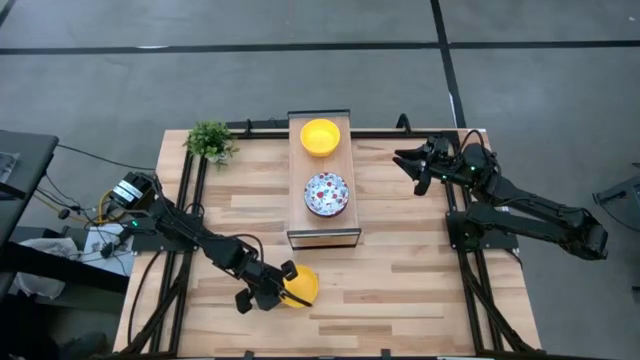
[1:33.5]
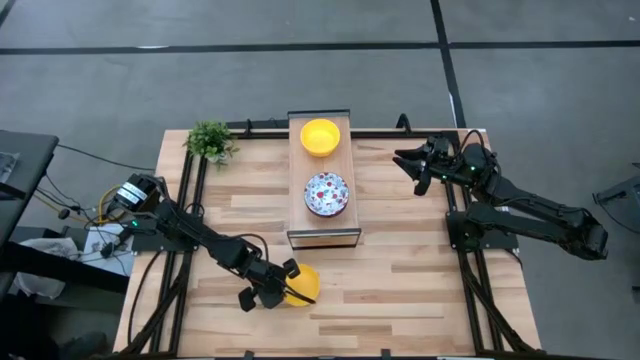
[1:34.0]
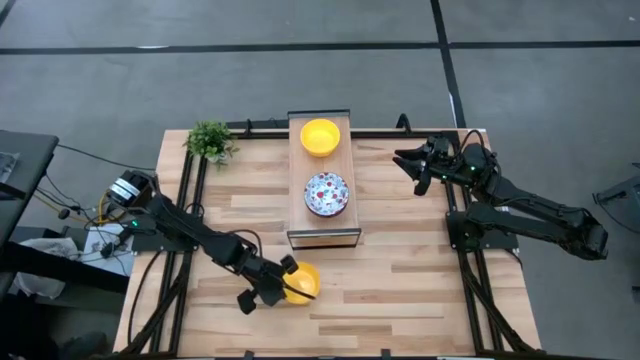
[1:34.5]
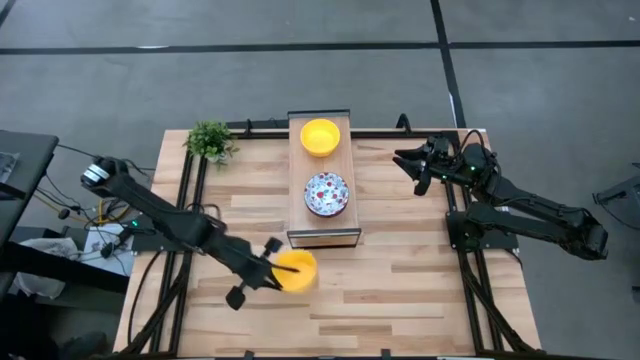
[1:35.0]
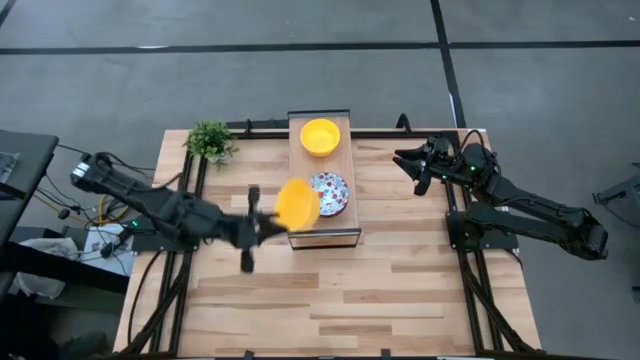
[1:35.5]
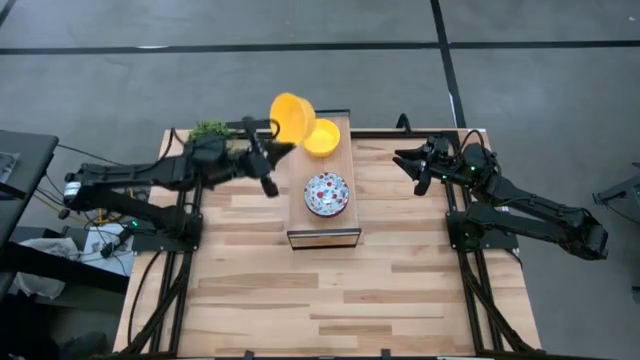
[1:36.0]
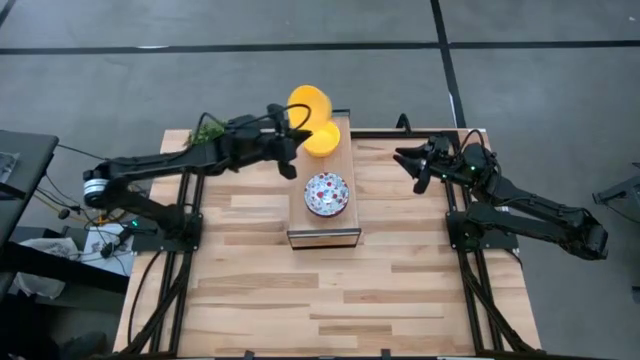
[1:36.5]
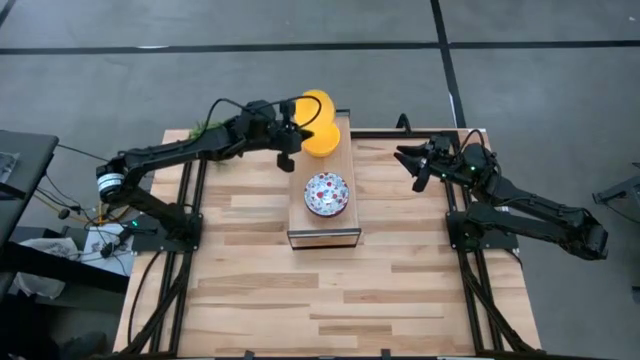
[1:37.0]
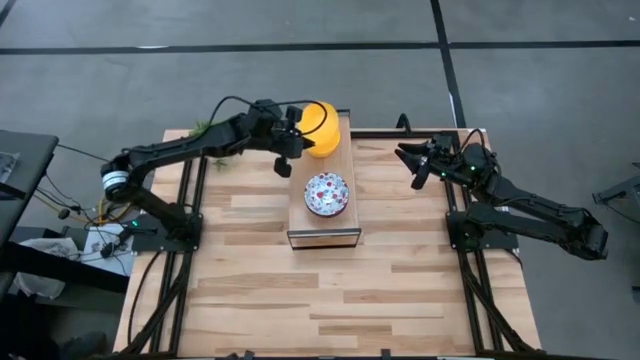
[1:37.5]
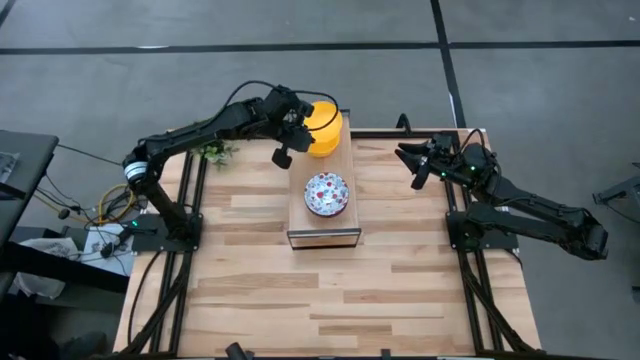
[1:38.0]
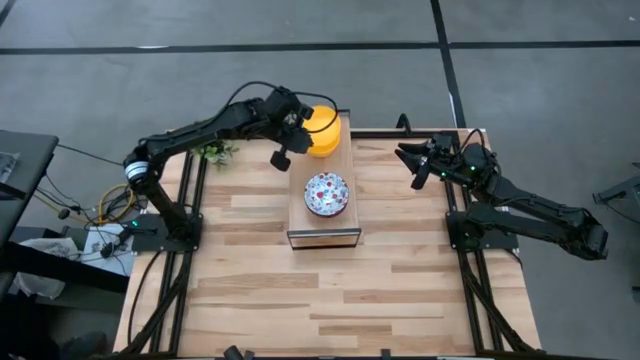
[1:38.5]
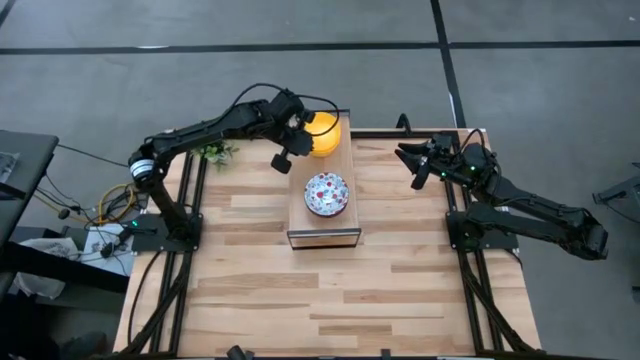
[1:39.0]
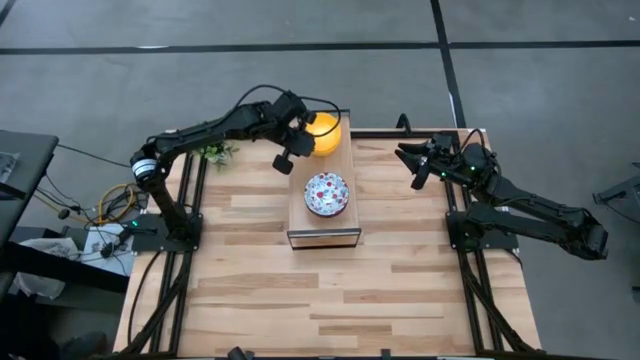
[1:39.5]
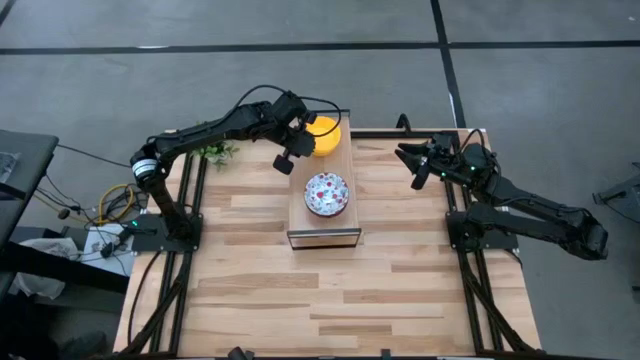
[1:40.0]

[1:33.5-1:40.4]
Task: Pick & Place Mini bowls
Stack the yellow bowl on top of the yellow bowl on the shelf

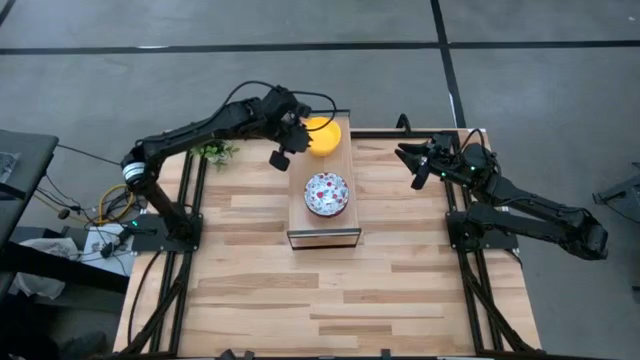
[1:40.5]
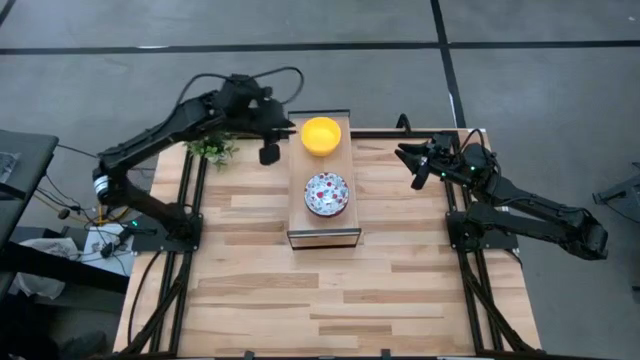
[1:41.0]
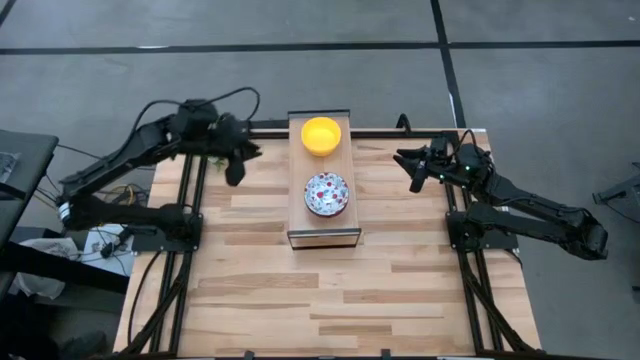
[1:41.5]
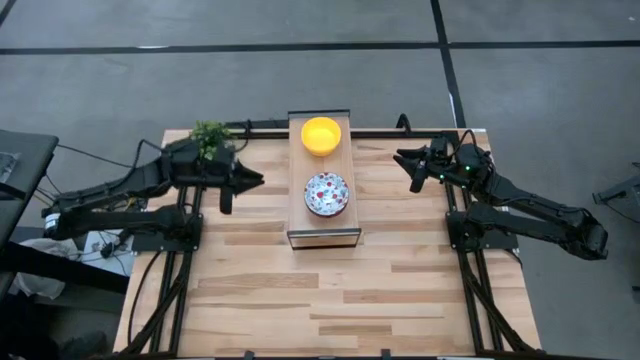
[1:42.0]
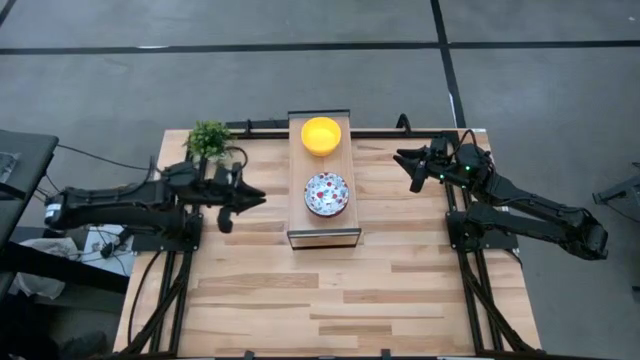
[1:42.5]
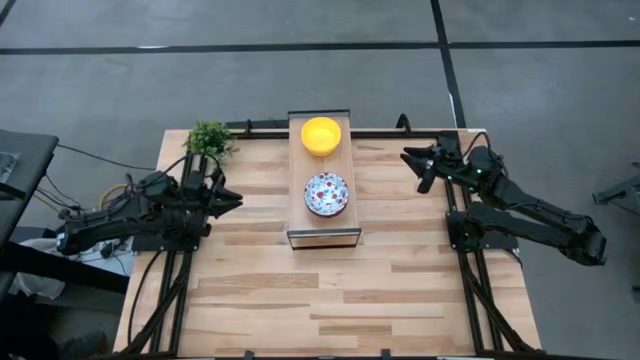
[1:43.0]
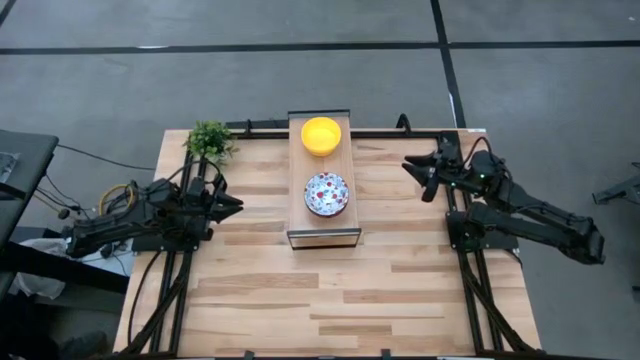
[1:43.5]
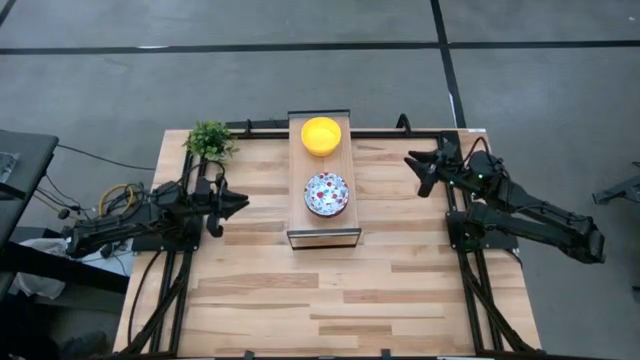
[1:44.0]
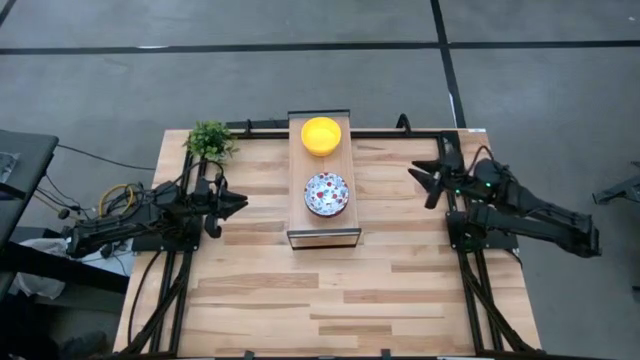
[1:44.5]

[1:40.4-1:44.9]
Return to Home Position

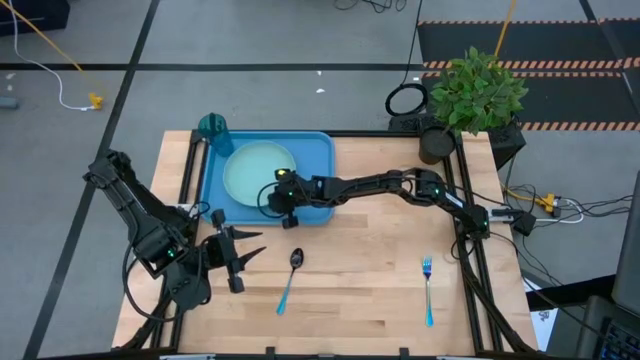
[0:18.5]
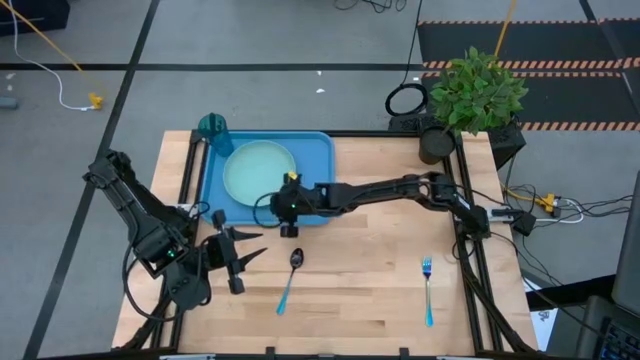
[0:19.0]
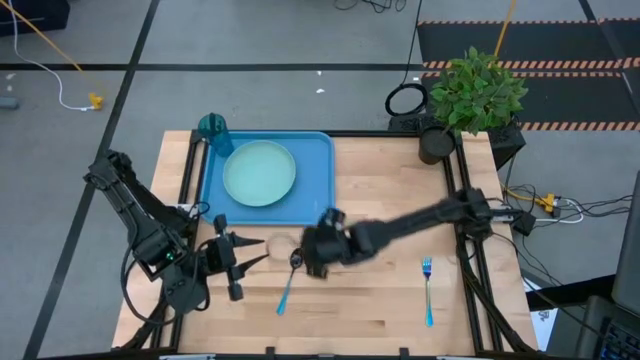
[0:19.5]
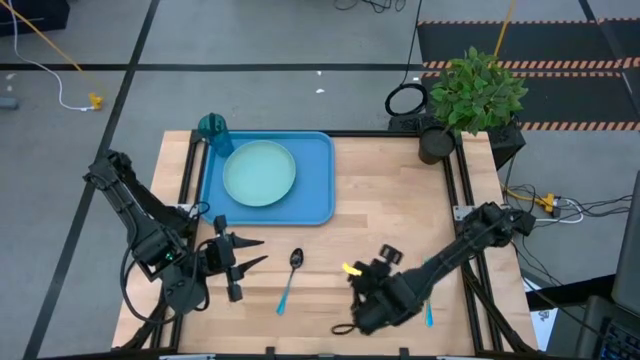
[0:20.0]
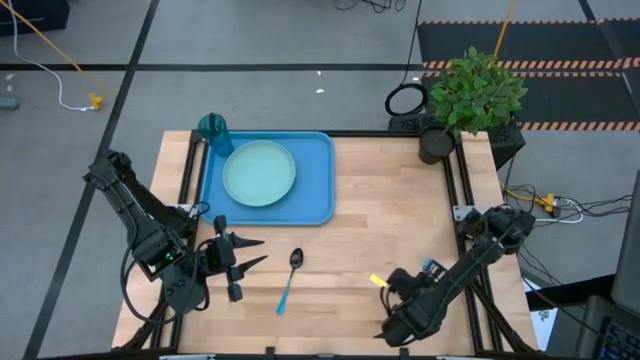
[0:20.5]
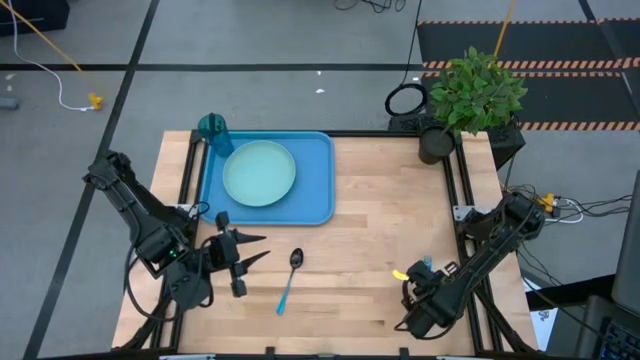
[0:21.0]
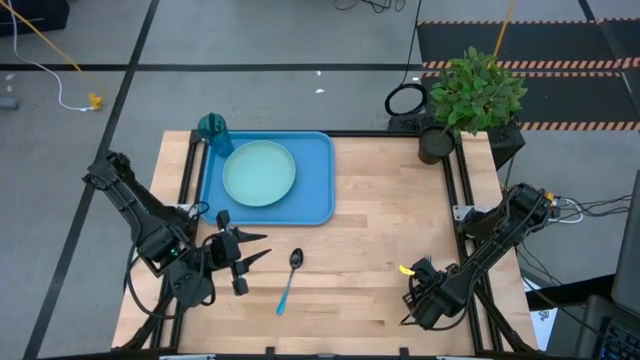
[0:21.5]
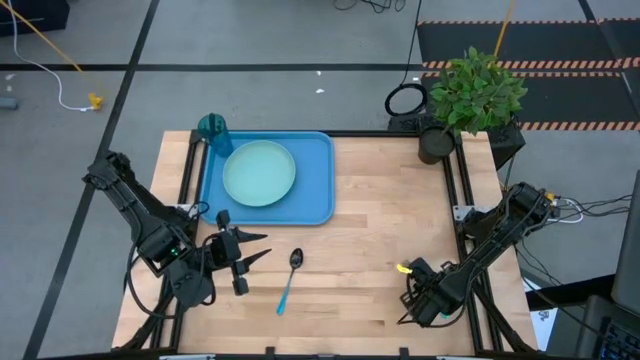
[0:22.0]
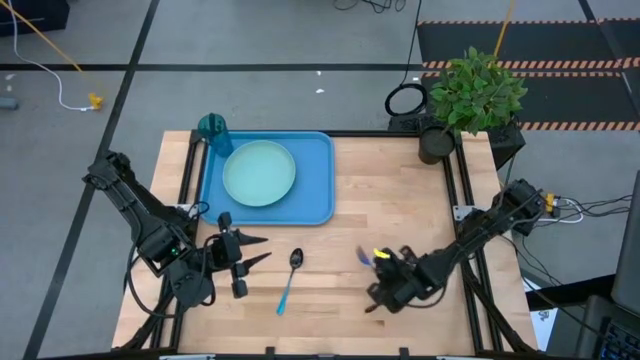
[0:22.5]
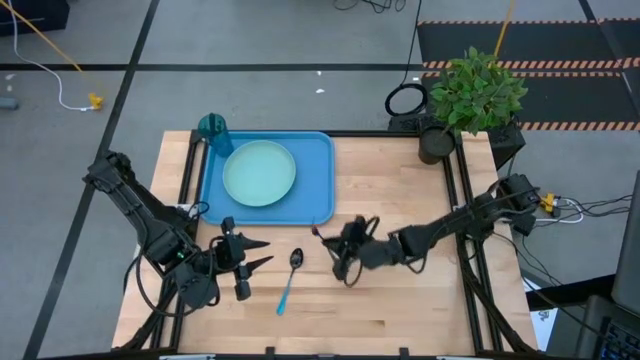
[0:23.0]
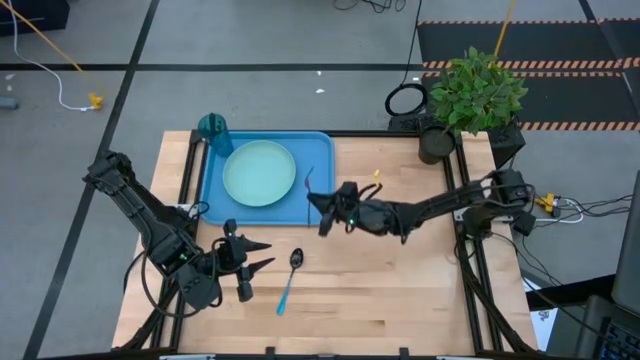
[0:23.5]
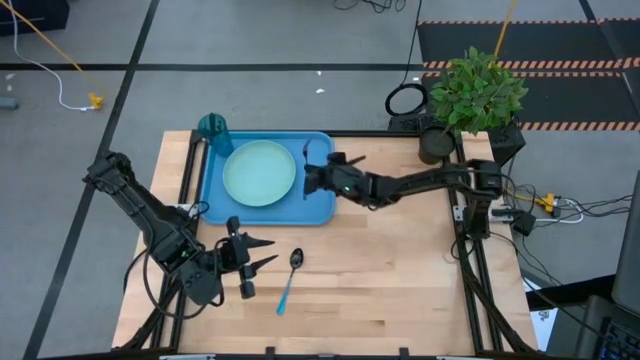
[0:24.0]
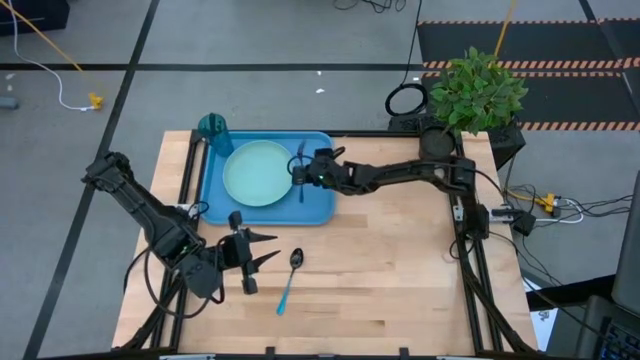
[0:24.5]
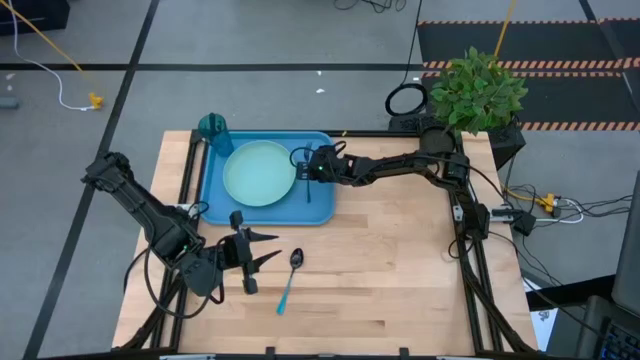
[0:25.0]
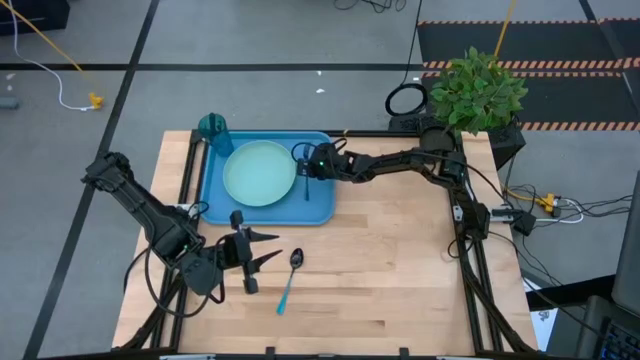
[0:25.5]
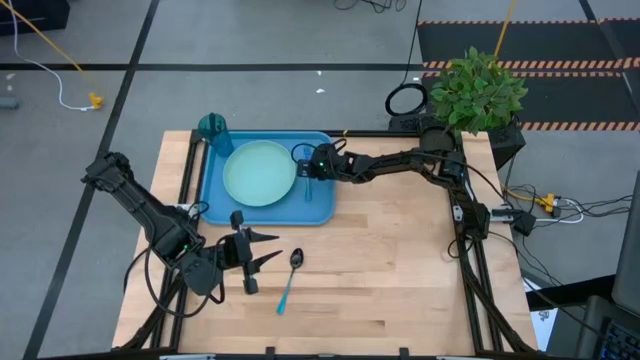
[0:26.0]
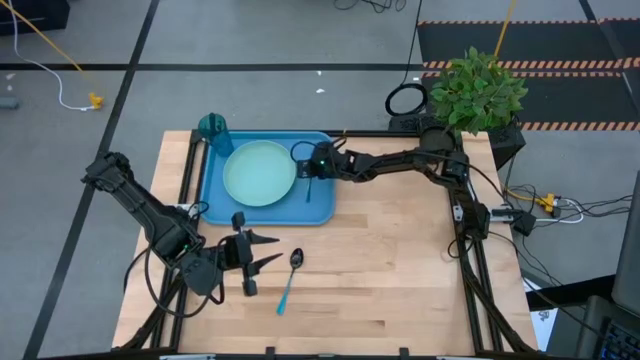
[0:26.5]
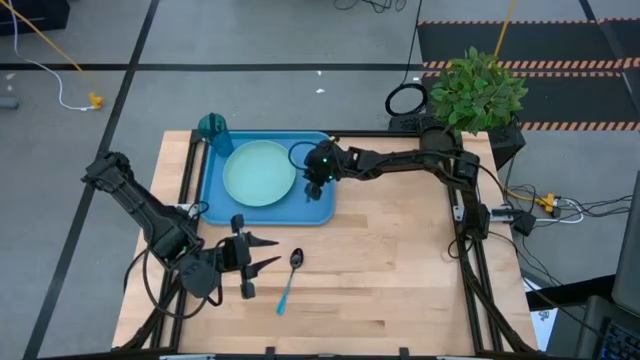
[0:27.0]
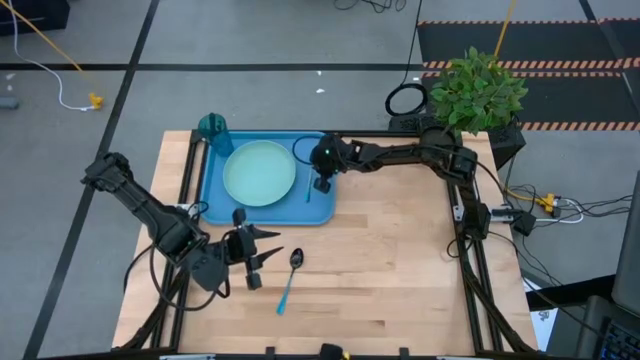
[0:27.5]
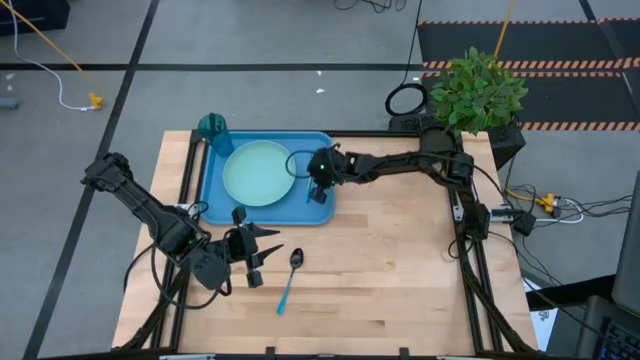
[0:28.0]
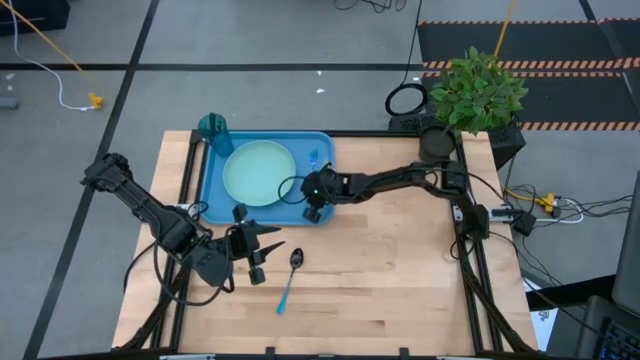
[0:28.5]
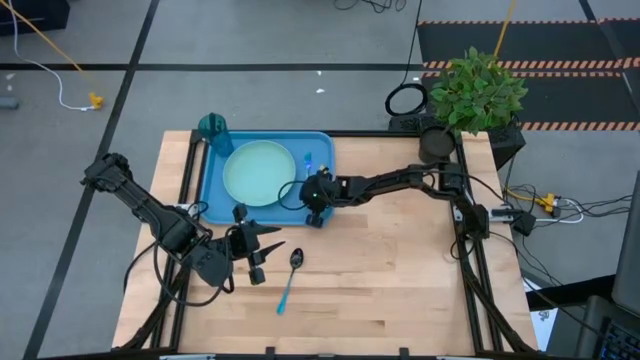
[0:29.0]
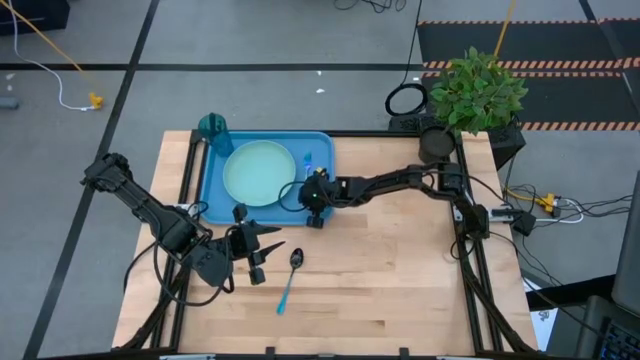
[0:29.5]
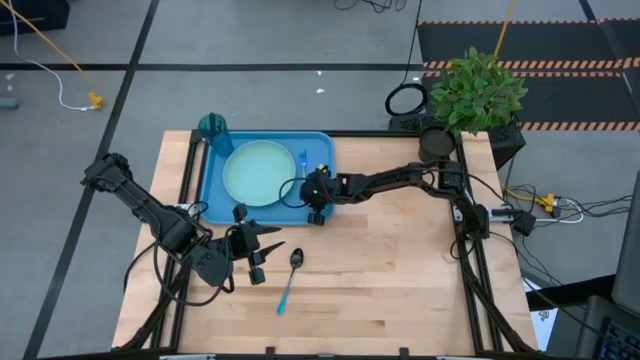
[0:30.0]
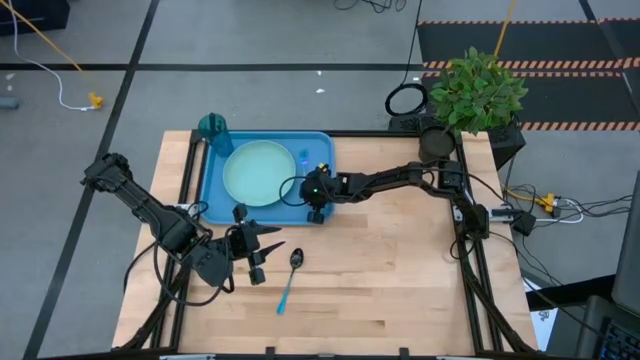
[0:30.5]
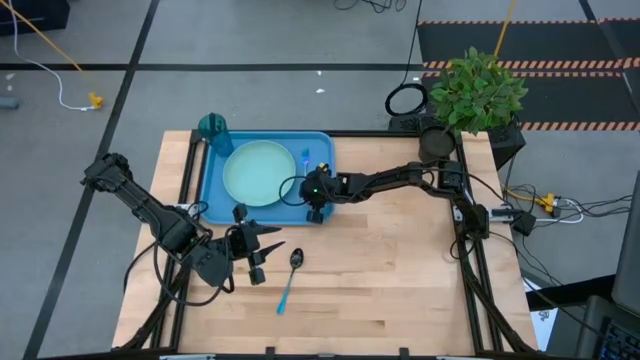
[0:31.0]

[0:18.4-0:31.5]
Task: Pick and place plate/cup/fork/spoon on tray
Put the fork on the blue tray
